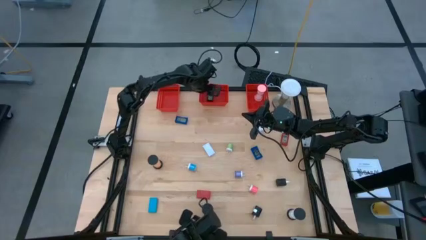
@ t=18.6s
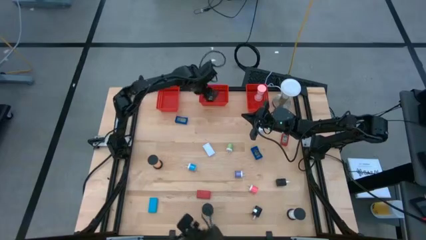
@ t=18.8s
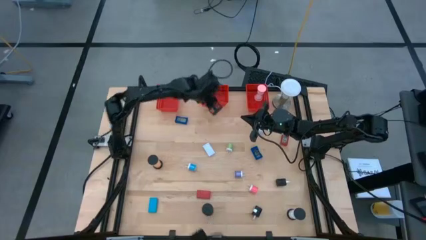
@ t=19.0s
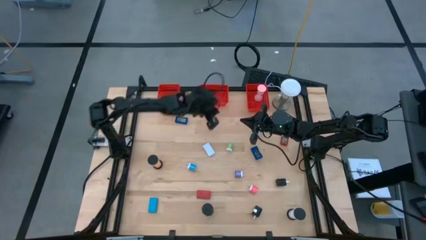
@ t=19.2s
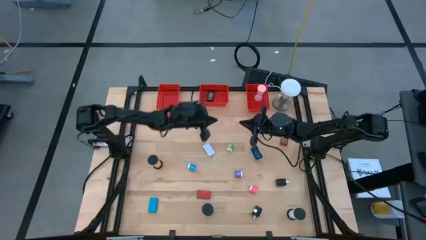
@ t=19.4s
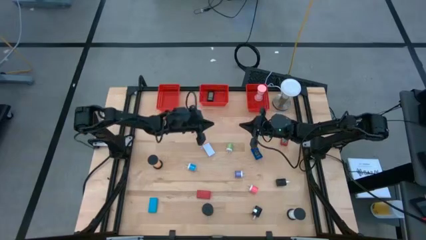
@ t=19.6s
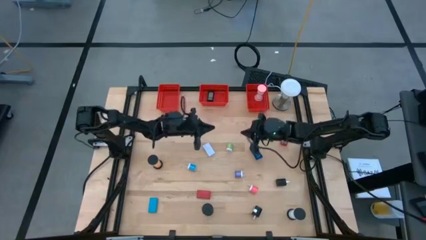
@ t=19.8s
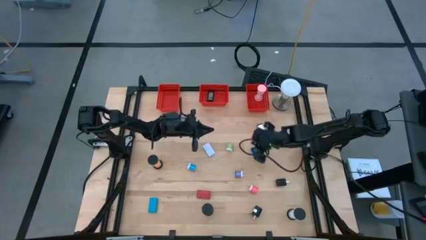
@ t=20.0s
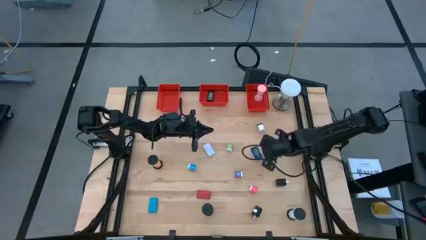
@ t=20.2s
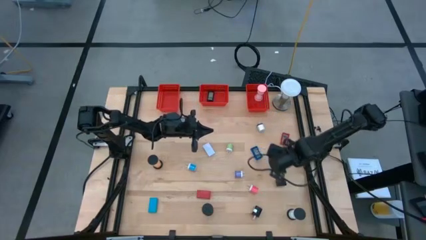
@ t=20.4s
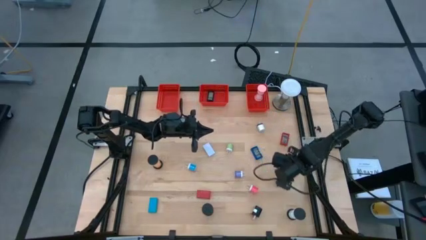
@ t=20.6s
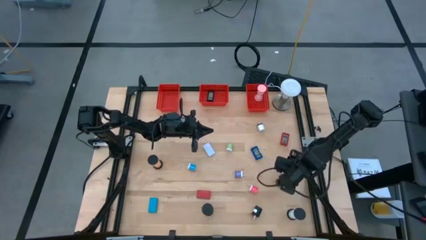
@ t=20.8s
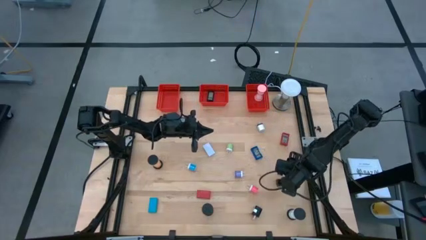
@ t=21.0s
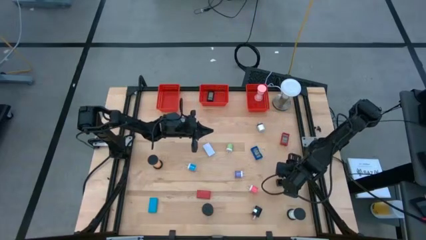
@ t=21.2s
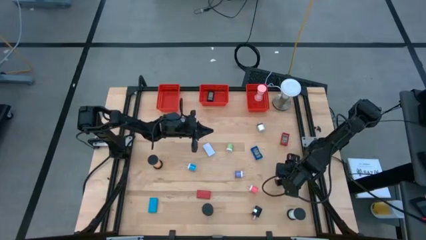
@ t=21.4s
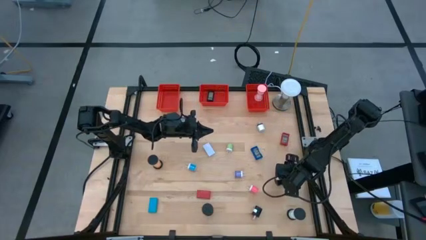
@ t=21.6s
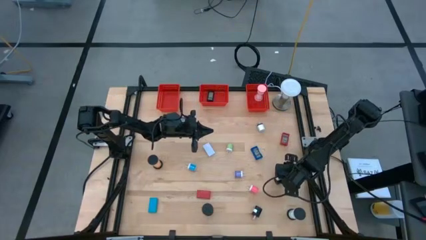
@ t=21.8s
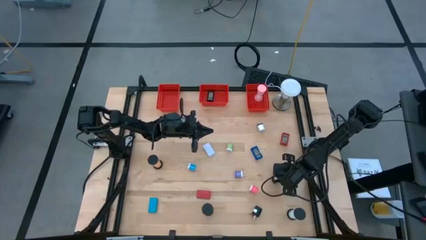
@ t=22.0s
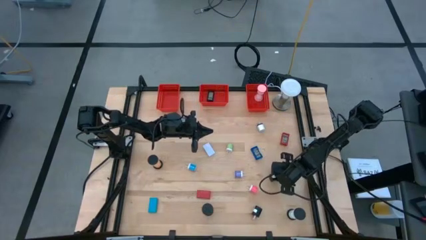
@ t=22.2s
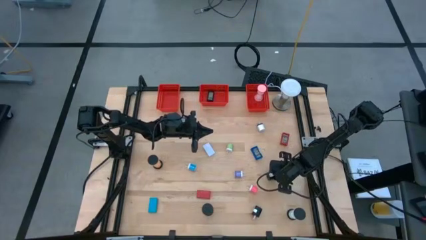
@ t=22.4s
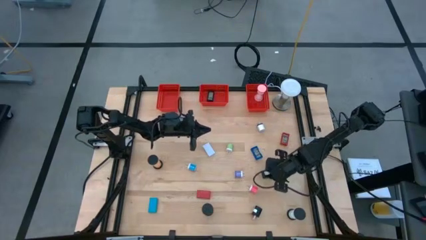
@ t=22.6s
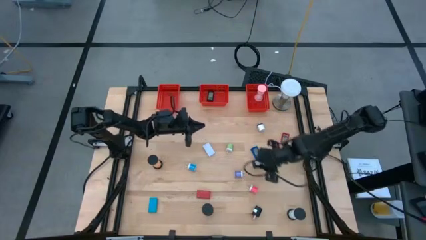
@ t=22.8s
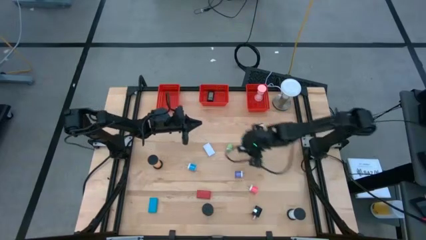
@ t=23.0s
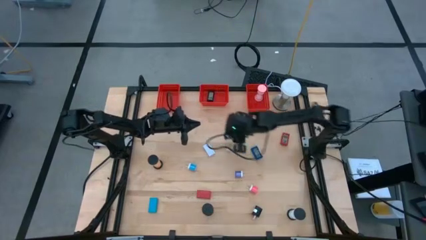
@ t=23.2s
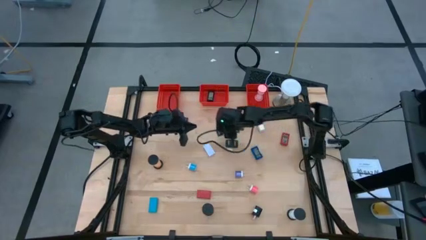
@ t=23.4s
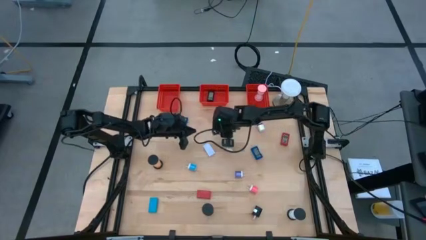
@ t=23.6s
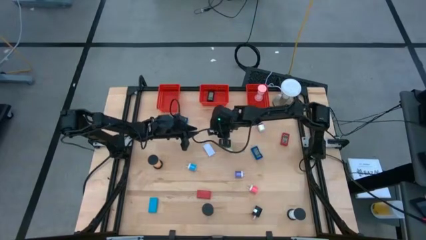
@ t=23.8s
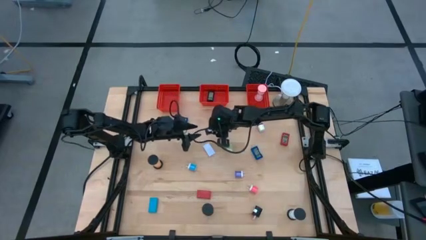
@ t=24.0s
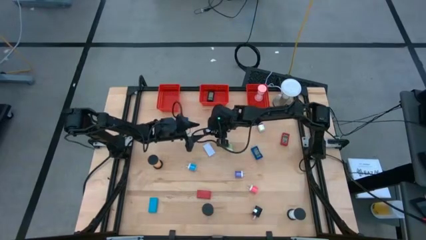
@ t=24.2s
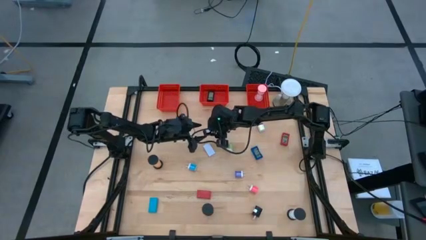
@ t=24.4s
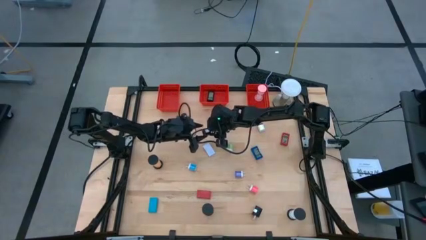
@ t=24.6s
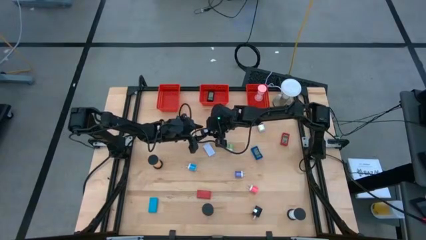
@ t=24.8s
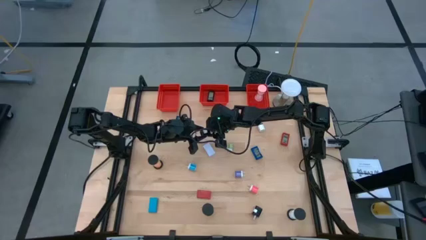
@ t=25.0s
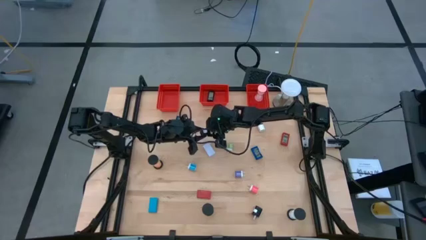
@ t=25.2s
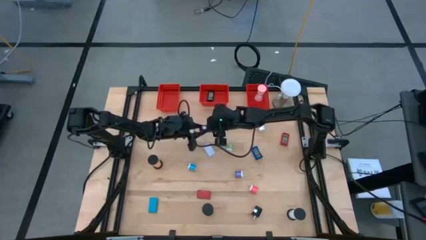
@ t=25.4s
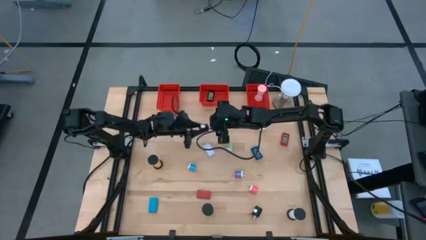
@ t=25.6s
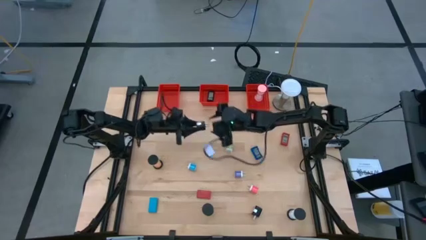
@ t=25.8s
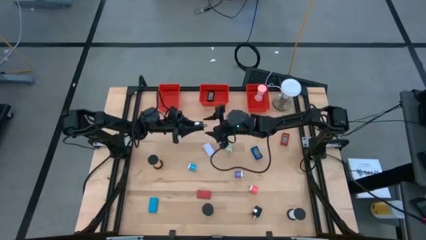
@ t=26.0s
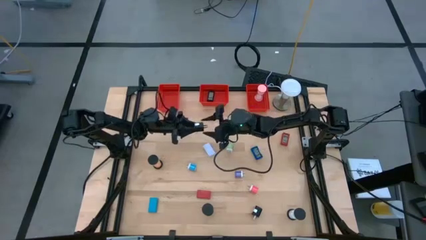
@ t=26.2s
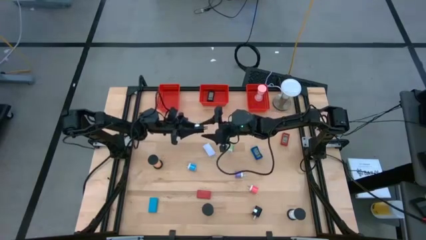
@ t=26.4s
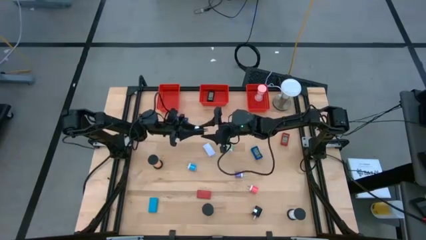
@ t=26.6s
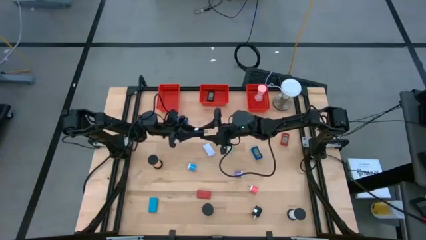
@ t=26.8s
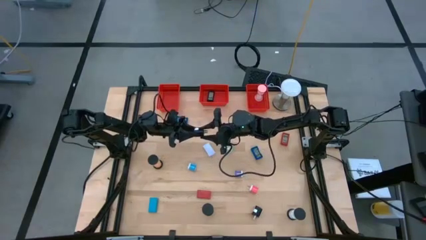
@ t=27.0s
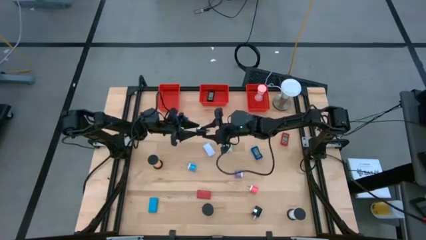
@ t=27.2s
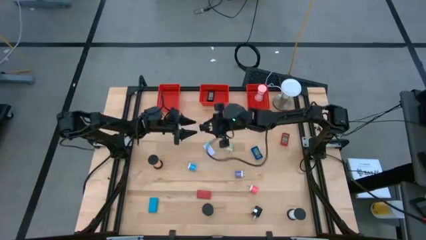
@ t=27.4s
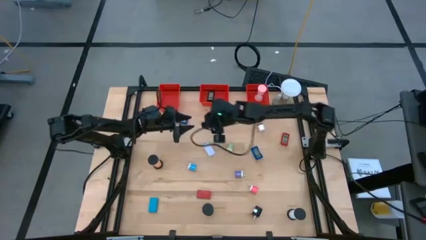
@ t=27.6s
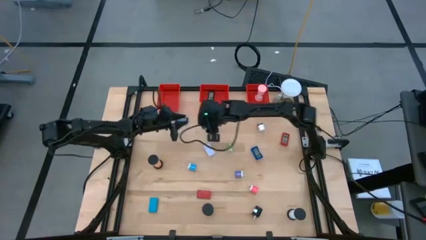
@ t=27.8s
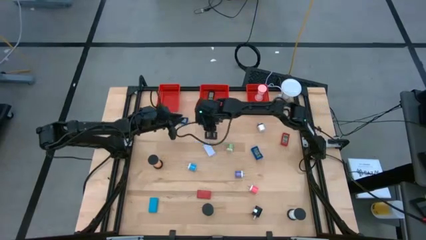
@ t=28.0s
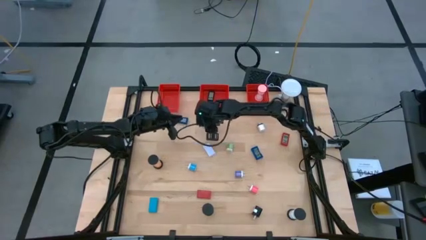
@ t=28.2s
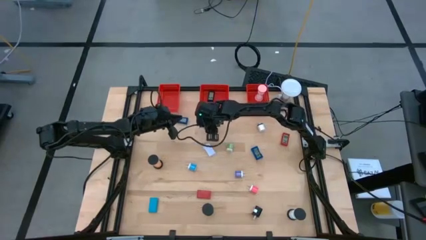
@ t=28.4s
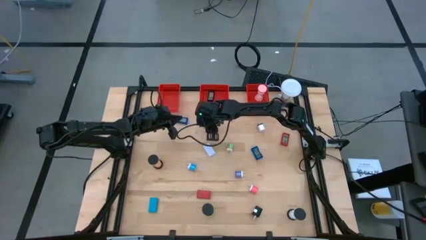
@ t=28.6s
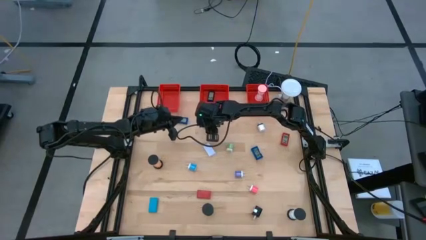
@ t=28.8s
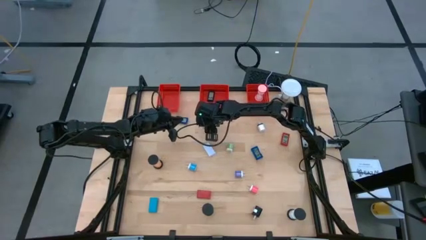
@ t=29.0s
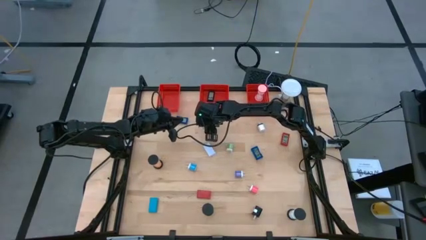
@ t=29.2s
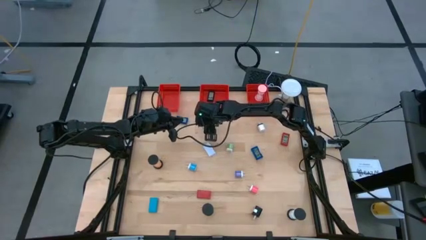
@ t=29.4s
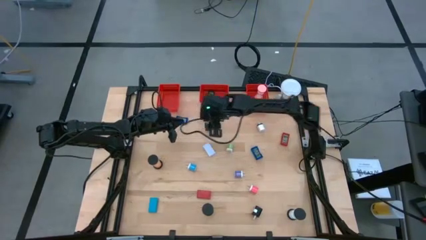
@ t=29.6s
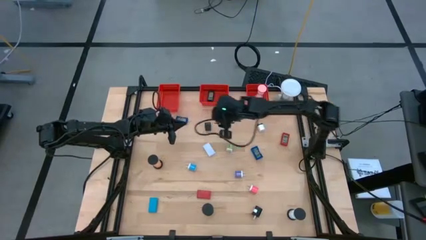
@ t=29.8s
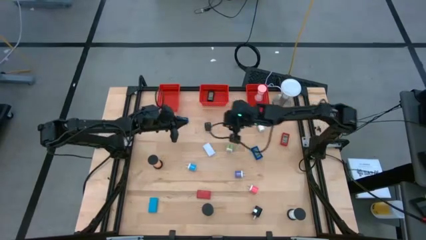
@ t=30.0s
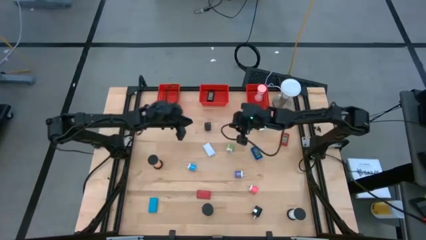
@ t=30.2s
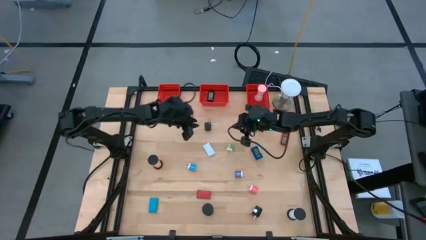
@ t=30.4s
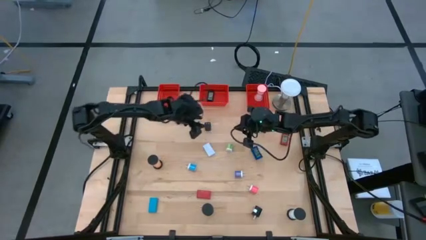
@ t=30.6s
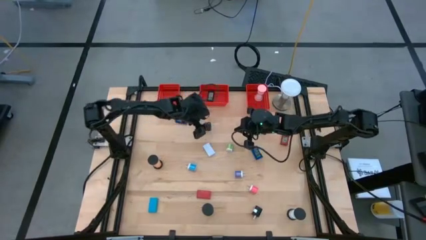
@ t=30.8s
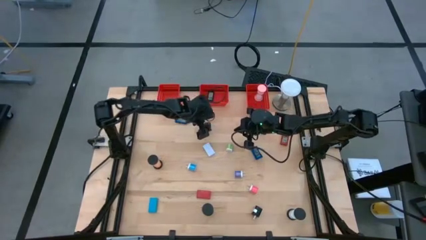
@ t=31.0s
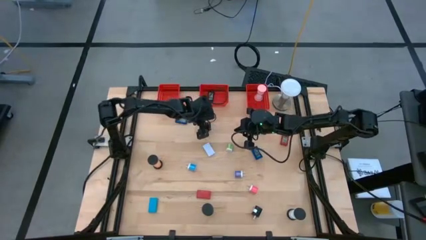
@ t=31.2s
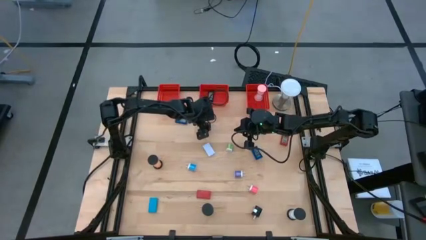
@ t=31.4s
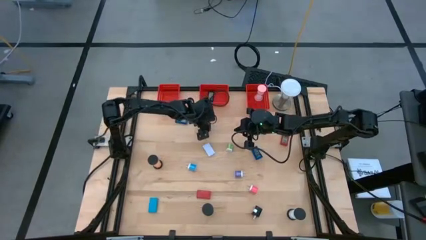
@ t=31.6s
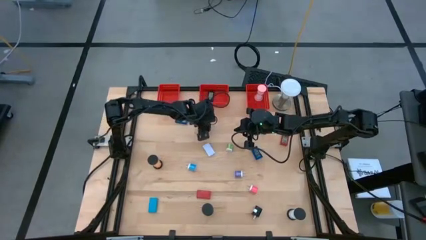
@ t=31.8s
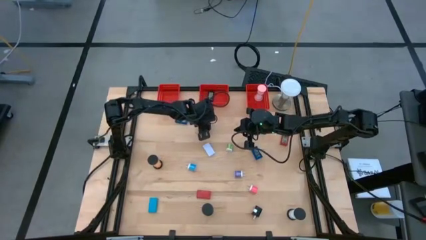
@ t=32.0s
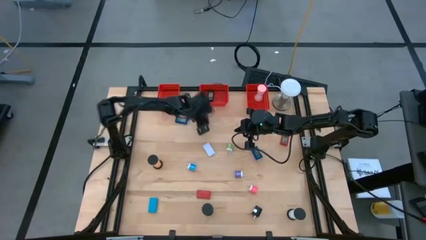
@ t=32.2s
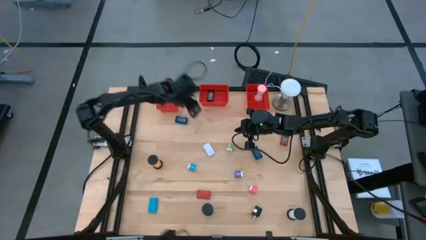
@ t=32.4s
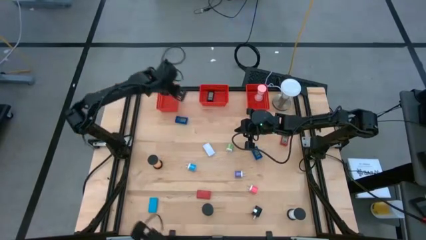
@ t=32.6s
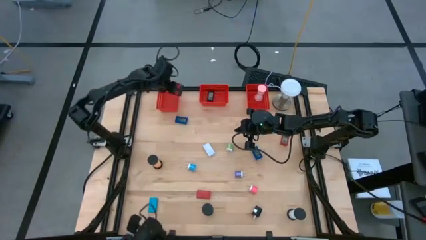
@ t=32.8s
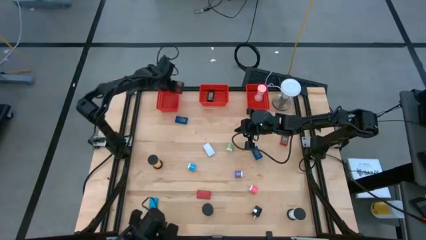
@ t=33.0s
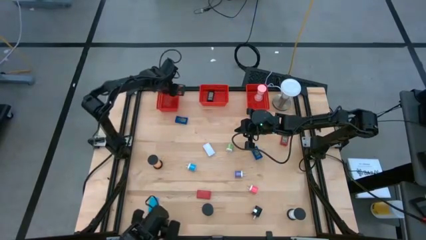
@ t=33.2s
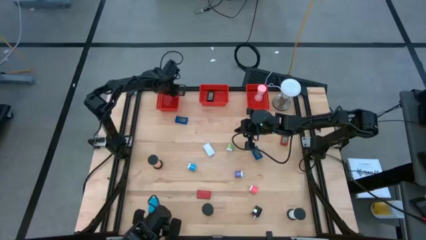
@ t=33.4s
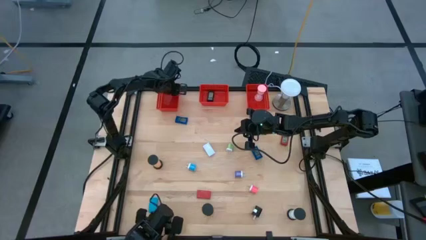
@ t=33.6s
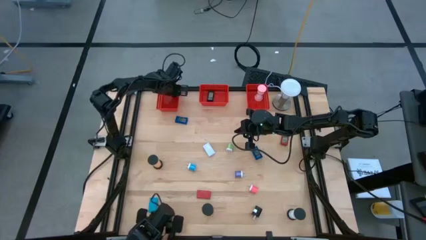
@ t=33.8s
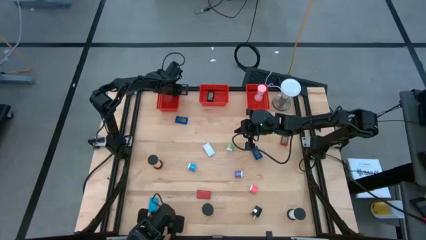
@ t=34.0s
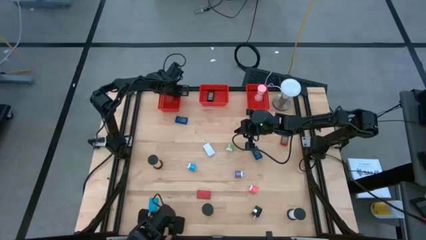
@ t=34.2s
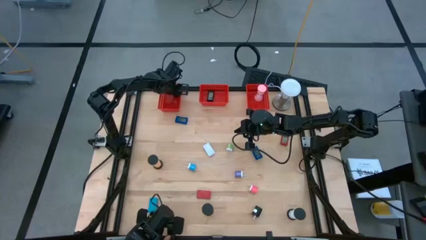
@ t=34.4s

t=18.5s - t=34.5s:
Task: Pick & Place Office items
Put the black charger adapter into the left red bin
